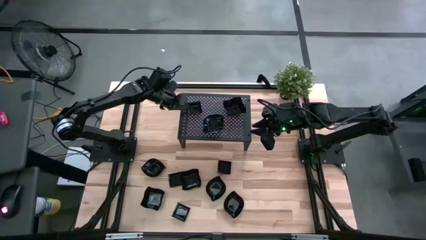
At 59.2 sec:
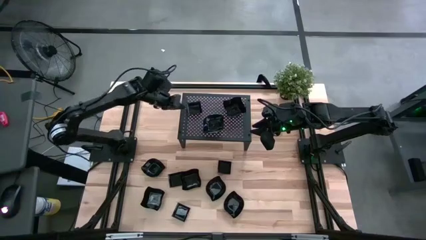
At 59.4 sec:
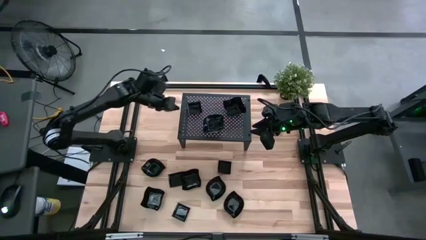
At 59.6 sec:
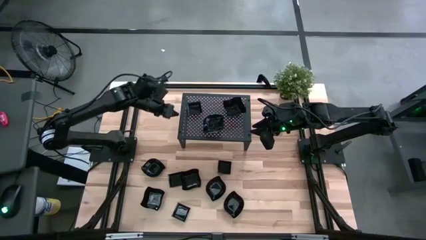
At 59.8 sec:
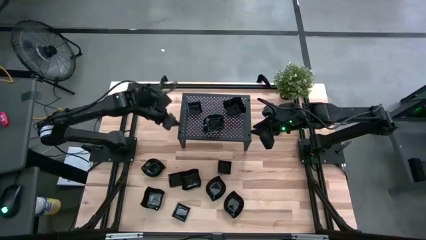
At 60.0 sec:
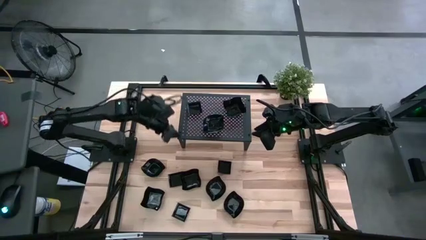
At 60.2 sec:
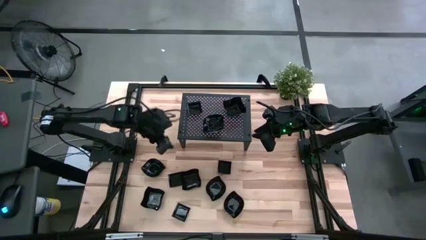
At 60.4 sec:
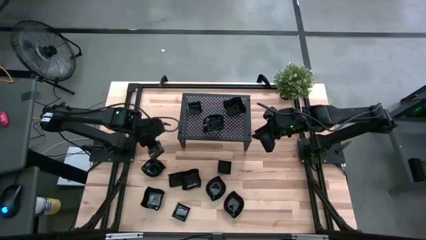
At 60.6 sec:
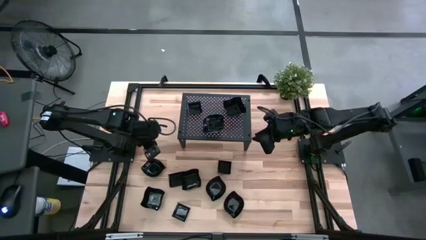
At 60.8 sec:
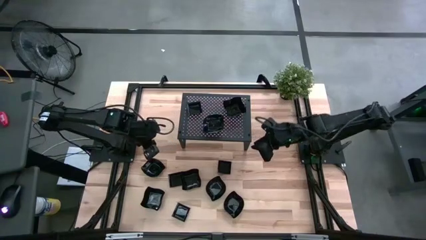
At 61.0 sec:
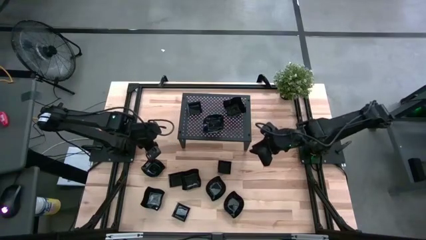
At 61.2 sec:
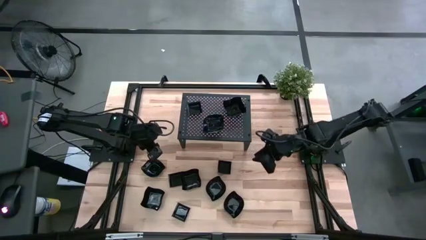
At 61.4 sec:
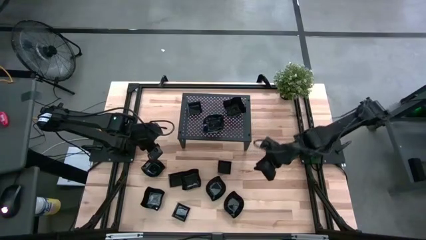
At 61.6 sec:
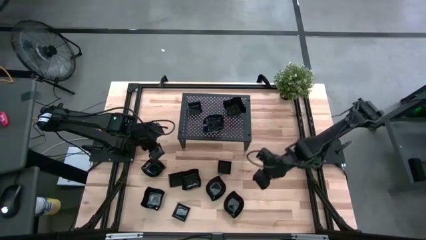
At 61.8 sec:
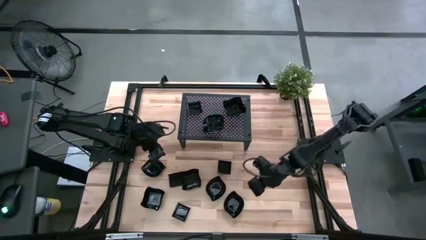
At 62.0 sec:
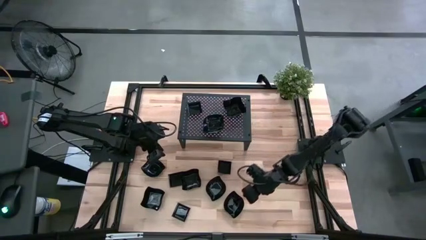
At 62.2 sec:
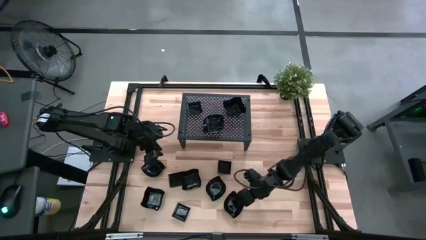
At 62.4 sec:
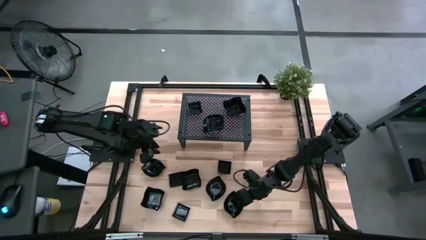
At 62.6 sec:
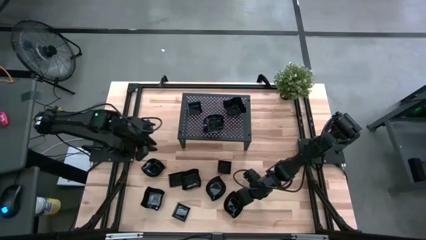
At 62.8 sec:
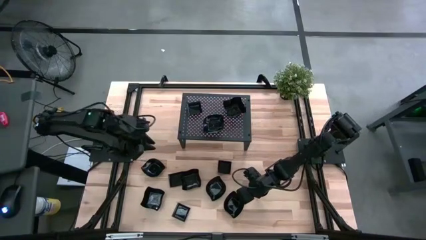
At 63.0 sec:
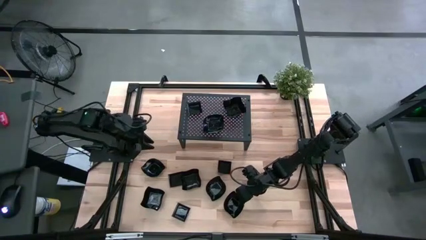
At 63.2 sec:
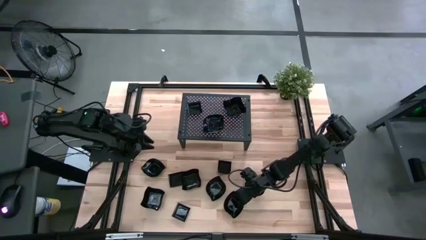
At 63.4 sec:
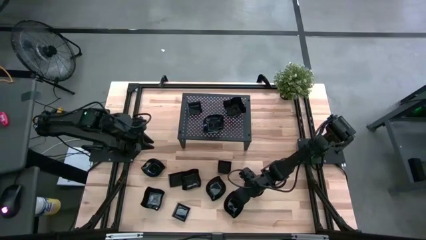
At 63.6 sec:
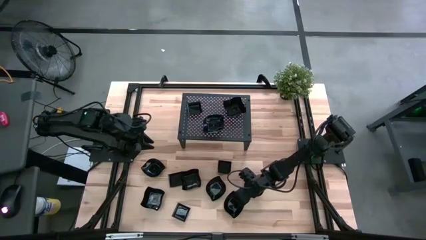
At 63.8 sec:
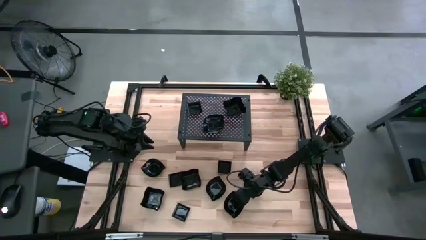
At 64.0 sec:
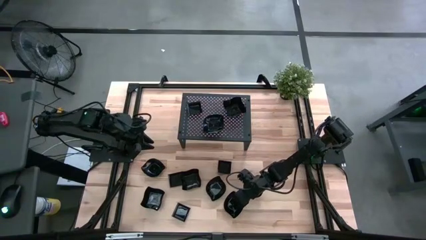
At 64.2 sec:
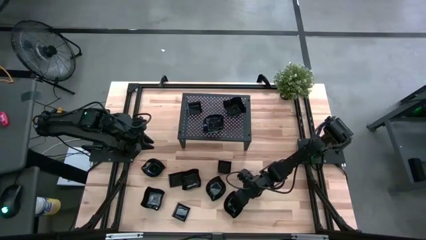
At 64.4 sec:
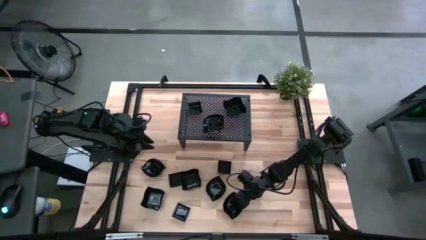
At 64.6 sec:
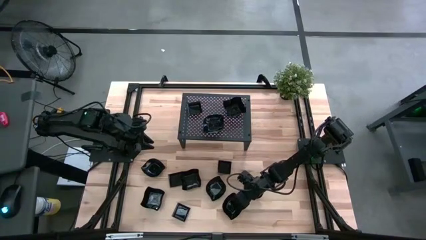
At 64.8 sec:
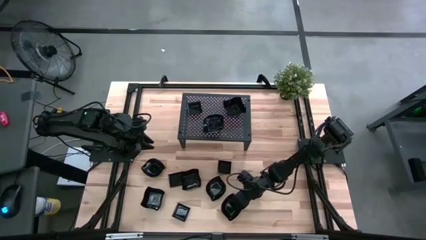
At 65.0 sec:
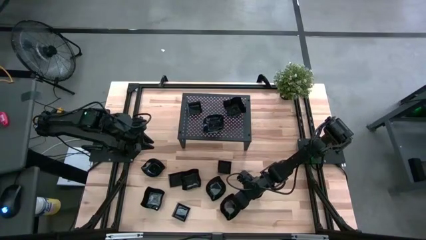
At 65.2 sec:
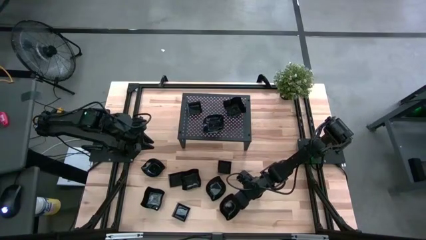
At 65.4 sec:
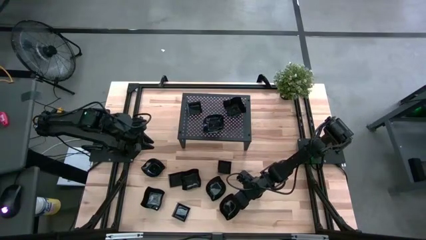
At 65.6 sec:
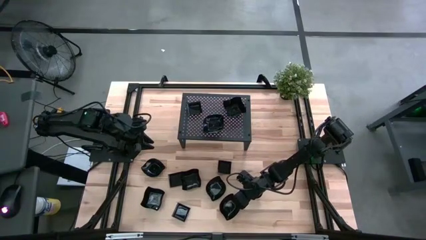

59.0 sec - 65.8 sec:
Task: Pick & Place Mini shaped plates
Stack the black leaf-shaped plate on top of the black leaf-shaped plate on the shelf

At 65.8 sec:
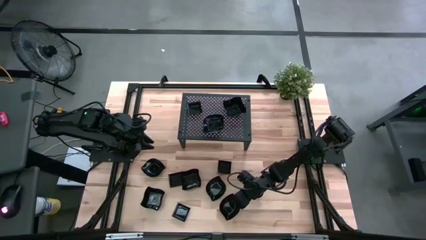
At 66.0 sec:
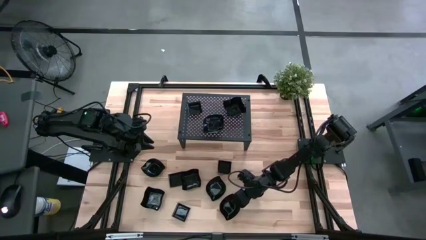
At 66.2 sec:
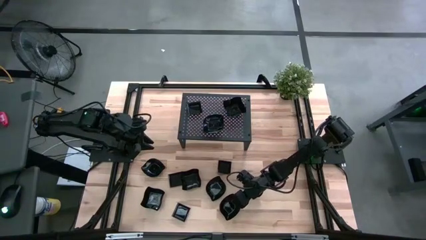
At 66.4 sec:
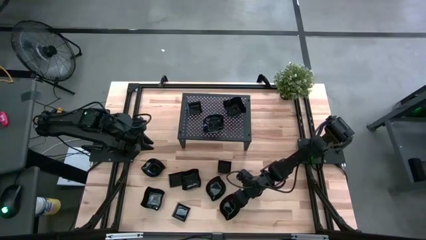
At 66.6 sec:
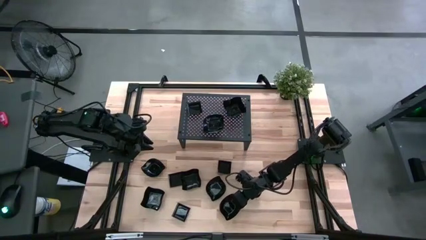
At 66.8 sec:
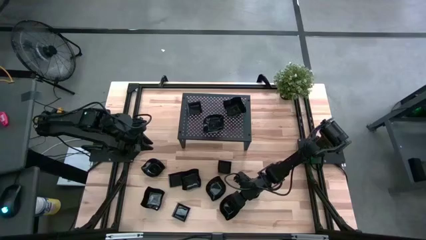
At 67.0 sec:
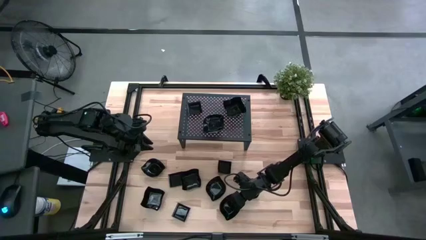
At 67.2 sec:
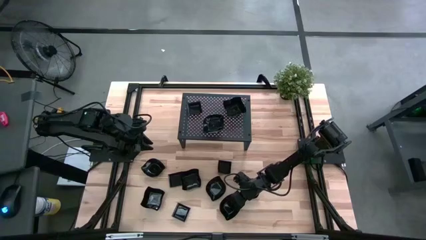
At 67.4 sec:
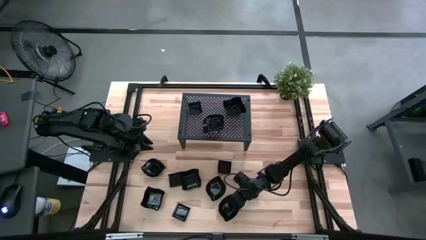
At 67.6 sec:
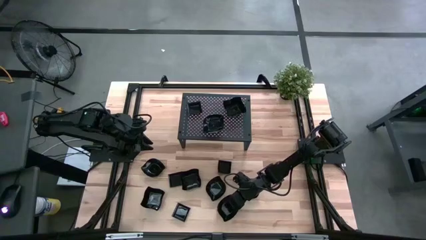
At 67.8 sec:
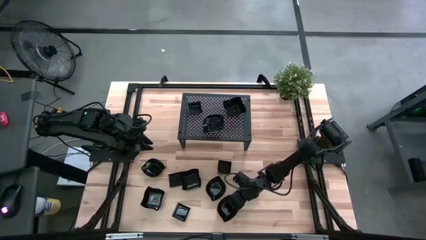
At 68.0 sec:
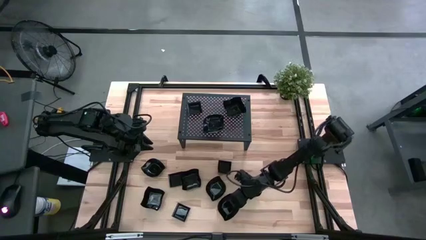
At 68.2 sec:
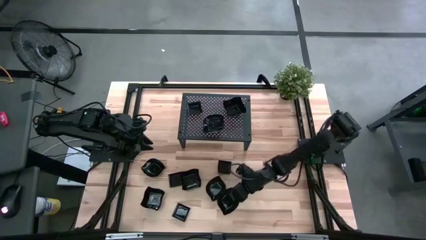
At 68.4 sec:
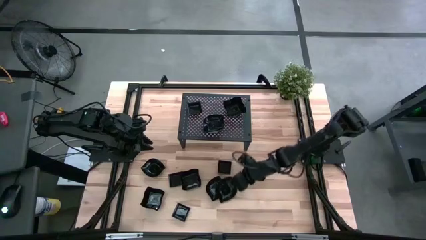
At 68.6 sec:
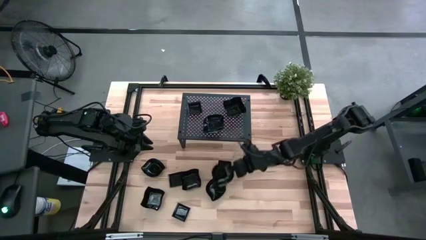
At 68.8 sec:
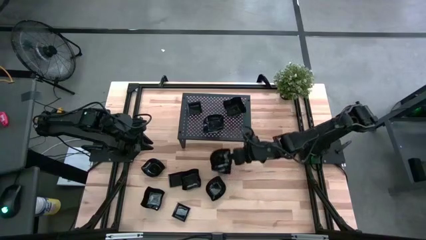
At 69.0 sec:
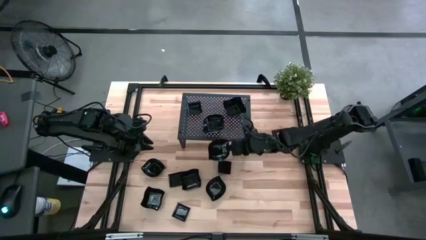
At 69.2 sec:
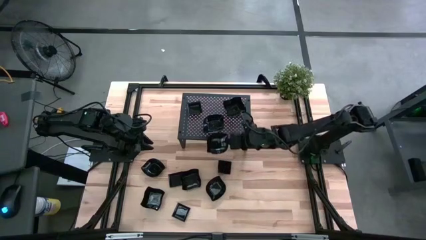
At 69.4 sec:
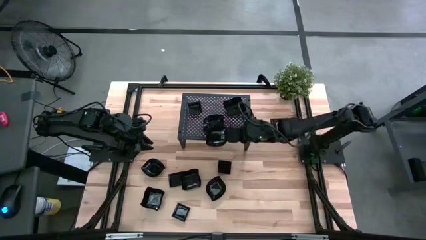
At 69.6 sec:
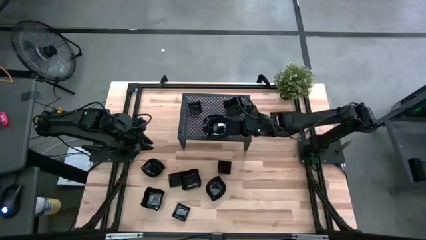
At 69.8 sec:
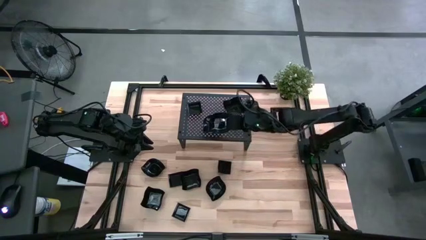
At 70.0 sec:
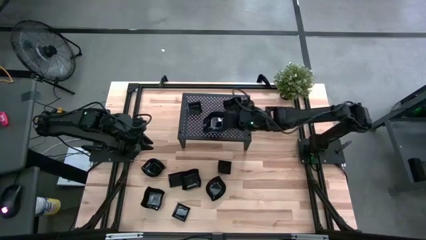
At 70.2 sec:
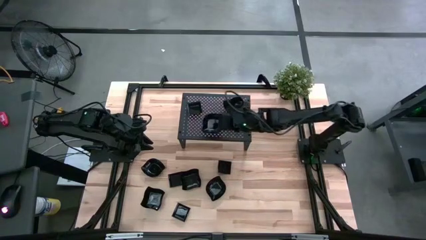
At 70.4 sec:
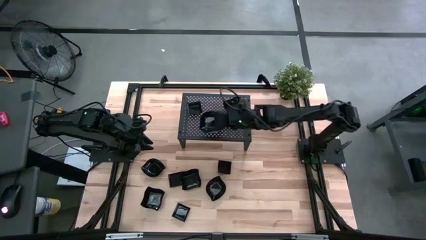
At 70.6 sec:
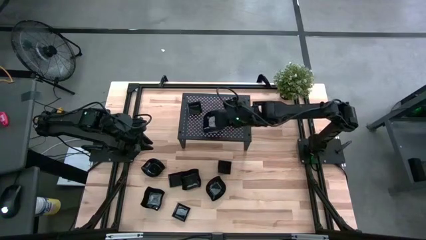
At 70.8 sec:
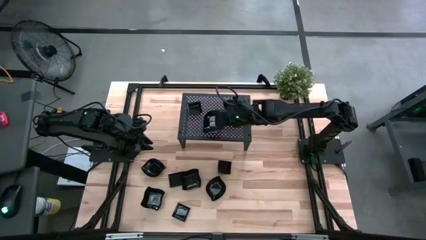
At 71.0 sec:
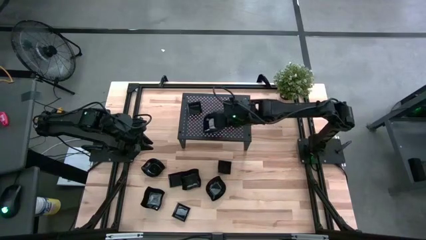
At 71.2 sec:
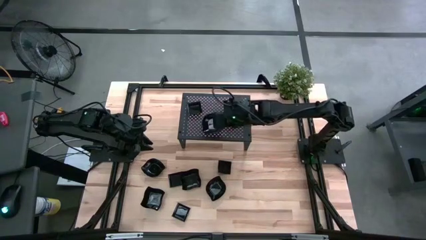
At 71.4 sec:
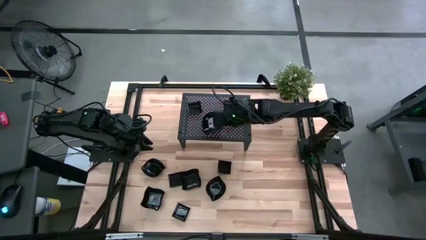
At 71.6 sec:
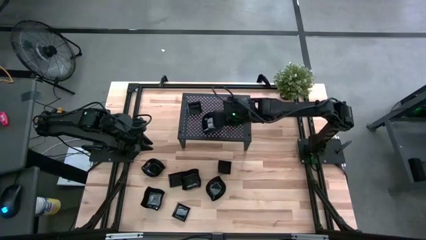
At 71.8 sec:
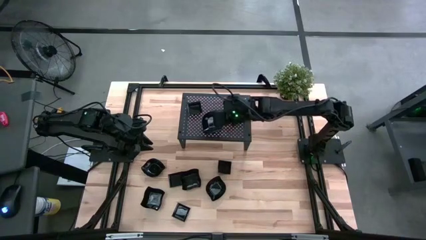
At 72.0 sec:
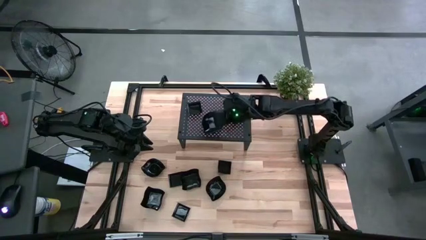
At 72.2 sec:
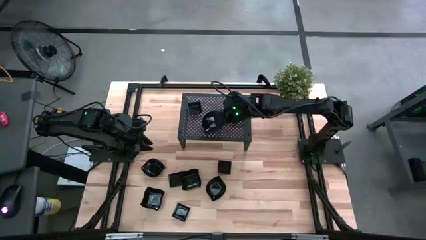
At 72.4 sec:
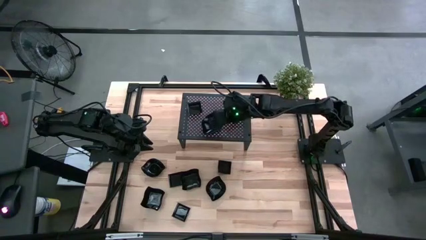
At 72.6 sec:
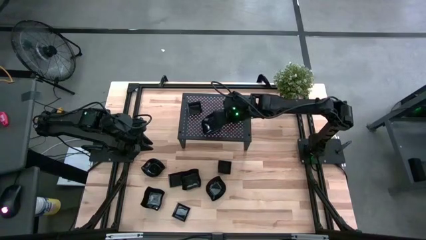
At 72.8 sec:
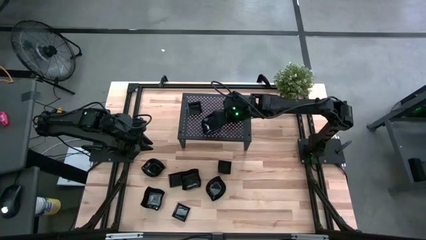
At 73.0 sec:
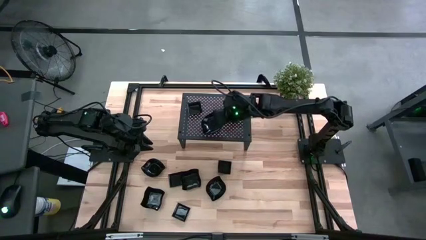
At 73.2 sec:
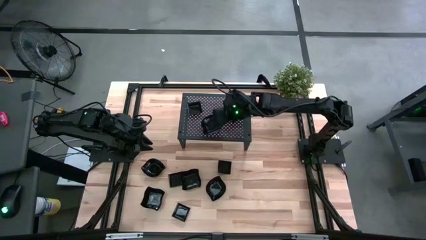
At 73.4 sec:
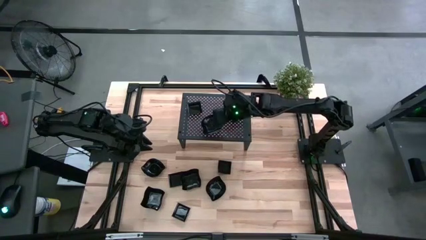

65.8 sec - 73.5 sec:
Stack the black leaf-shaped plate on top of the black leaf-shaped plate on the shelf
